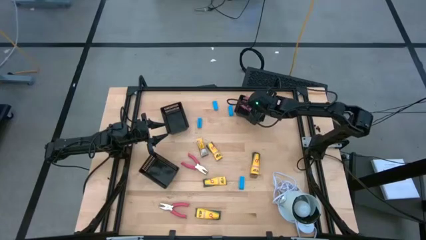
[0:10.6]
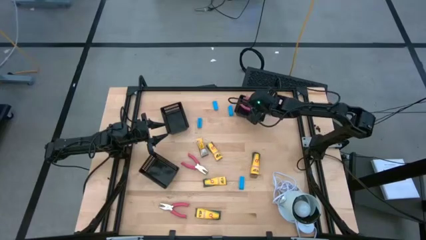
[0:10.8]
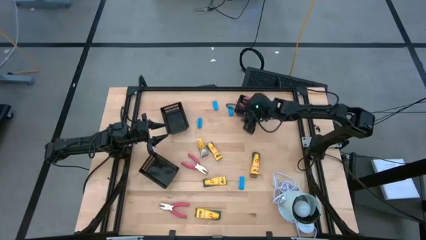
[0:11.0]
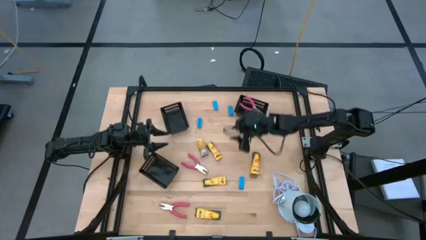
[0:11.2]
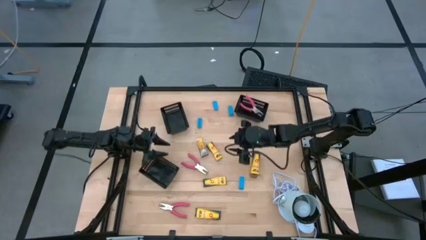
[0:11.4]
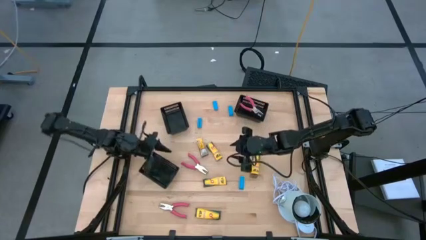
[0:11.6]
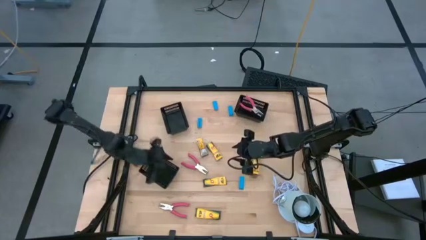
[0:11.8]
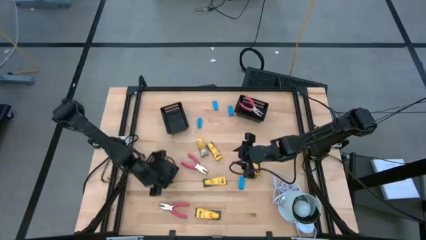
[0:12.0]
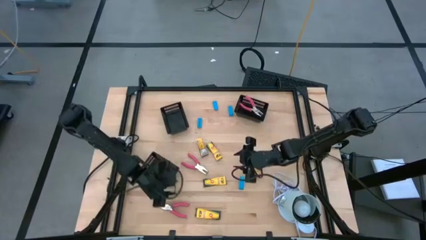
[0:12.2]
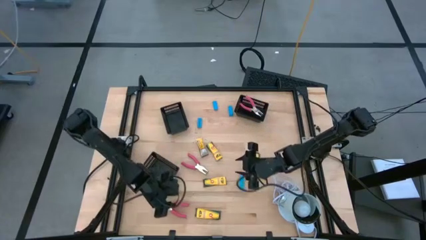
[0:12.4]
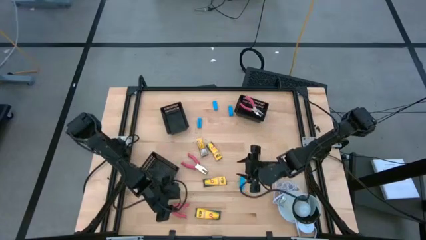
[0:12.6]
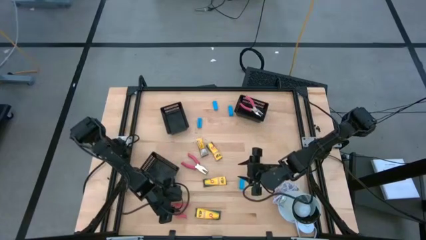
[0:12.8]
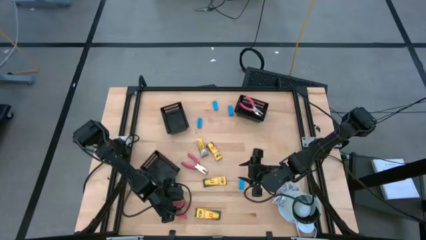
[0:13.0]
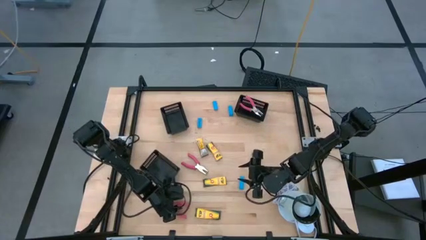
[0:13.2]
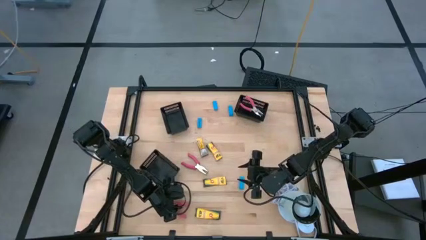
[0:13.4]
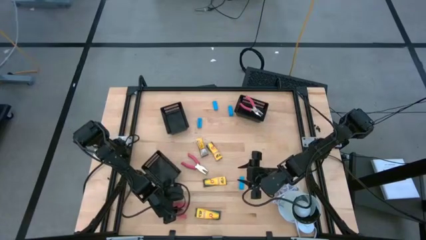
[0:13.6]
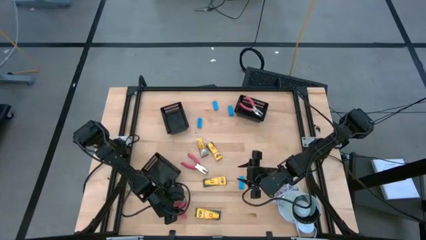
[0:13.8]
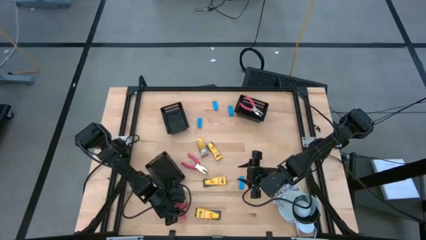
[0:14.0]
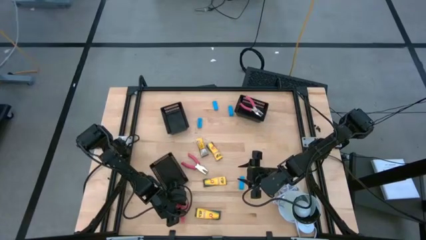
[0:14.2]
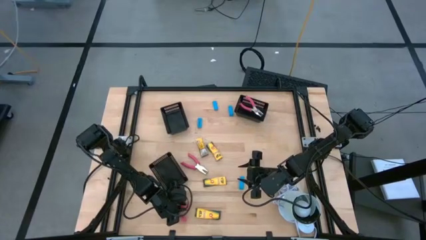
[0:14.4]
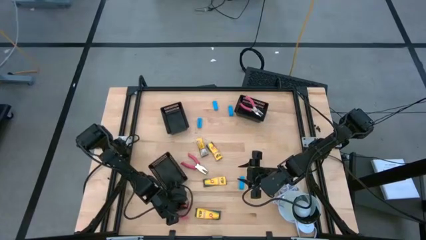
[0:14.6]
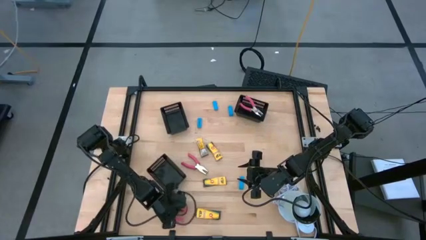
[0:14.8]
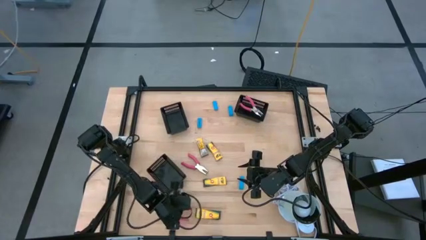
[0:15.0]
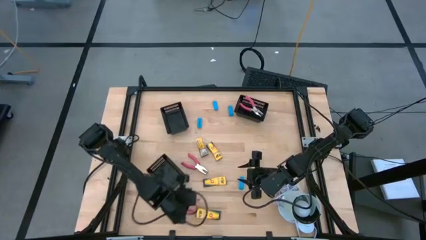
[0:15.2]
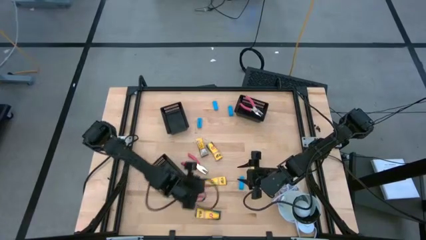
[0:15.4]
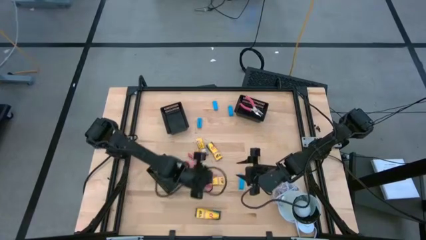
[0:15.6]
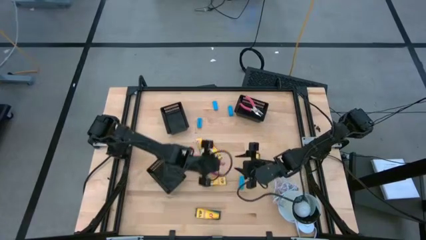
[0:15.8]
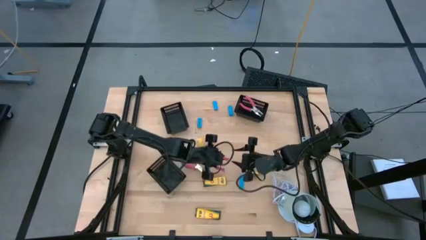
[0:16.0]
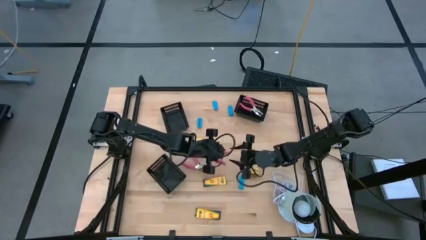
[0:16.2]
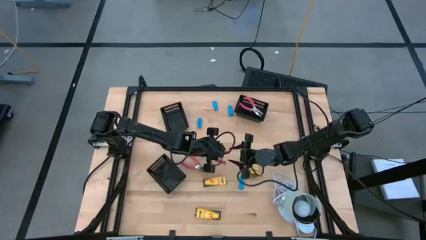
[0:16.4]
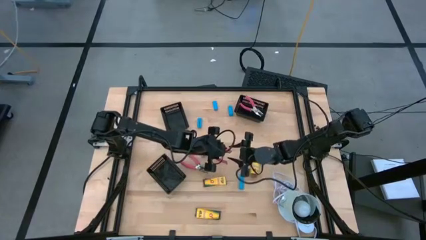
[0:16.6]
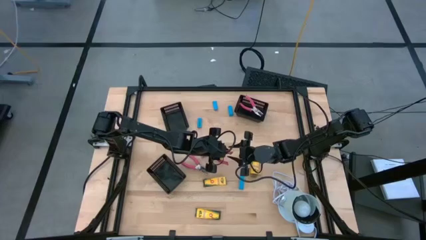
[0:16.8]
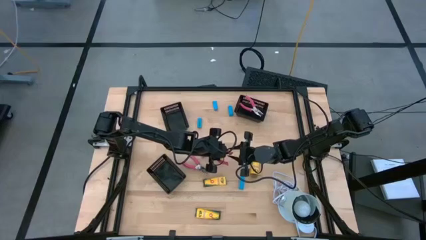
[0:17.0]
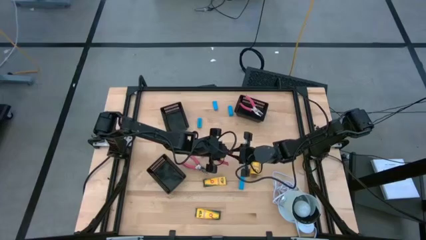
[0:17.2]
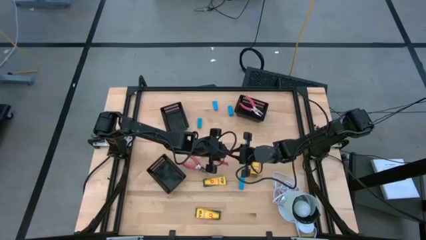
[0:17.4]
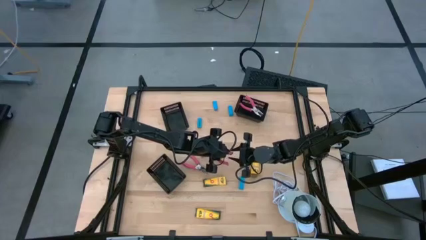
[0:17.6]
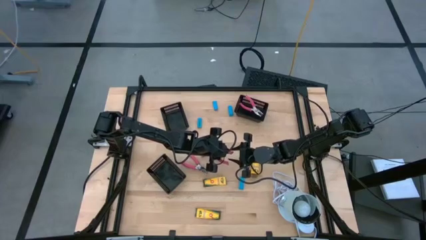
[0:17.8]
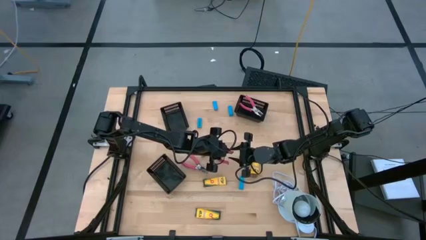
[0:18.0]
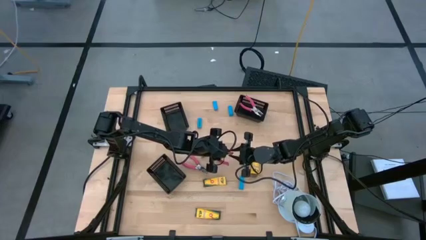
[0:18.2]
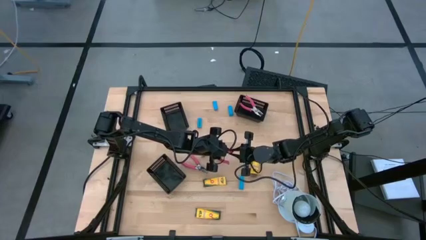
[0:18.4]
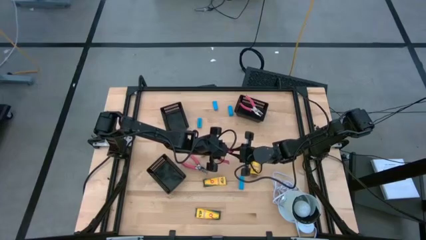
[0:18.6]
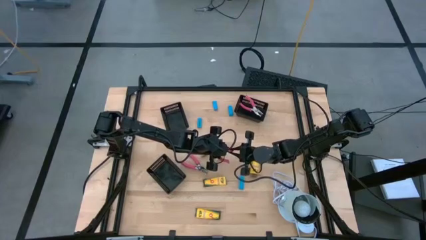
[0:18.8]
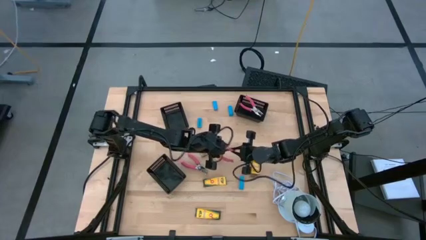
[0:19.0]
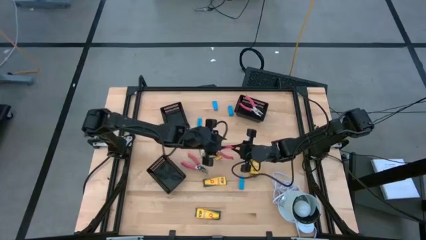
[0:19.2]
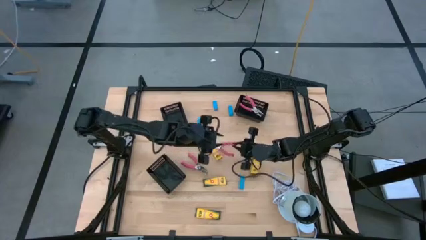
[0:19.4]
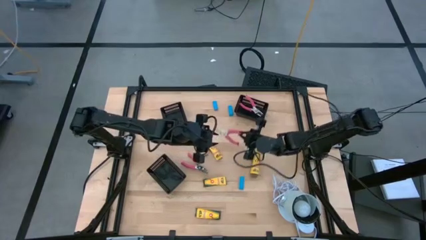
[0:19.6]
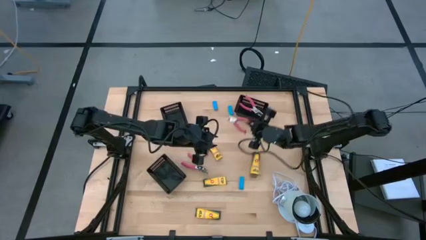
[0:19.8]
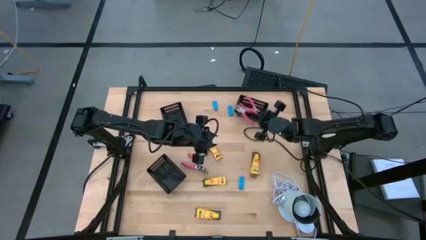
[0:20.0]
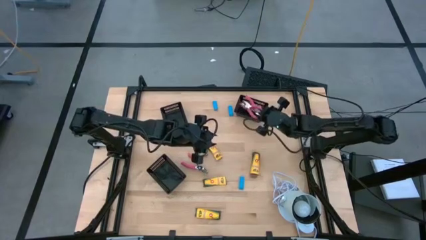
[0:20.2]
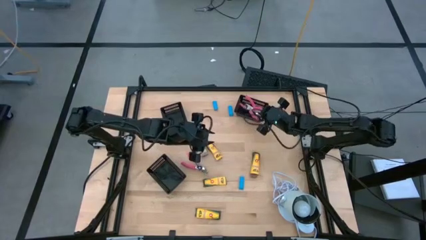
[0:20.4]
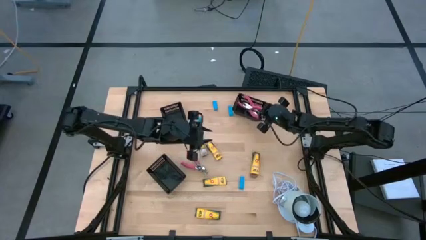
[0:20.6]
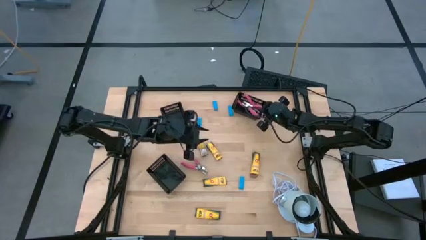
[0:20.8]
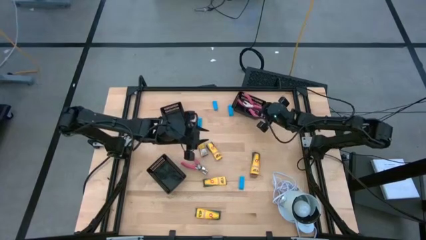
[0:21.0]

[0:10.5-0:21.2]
Task: Pick & Place School Supplies
Put the pink grommet eyelet pliers into the top right black bin

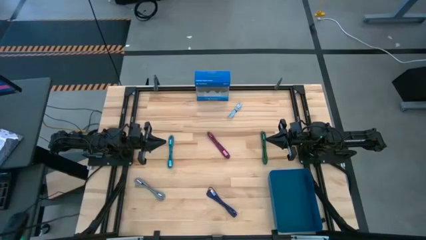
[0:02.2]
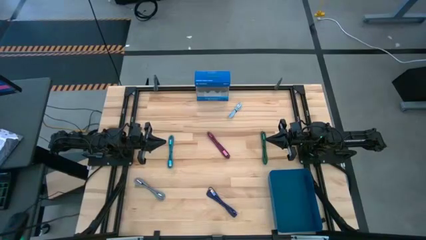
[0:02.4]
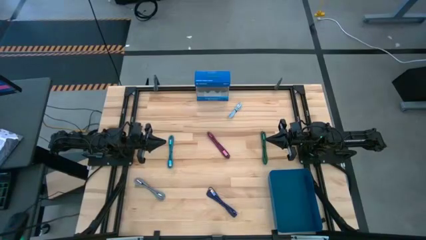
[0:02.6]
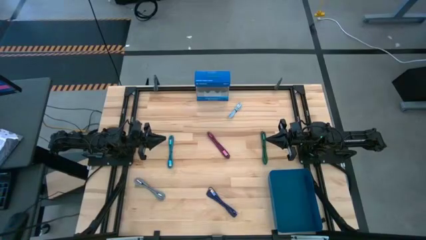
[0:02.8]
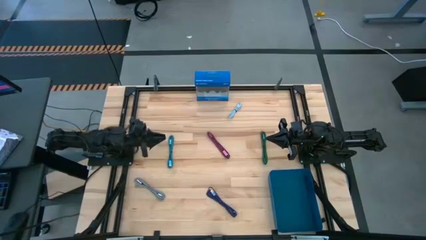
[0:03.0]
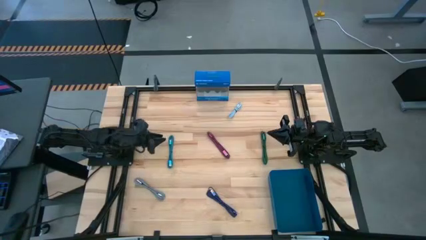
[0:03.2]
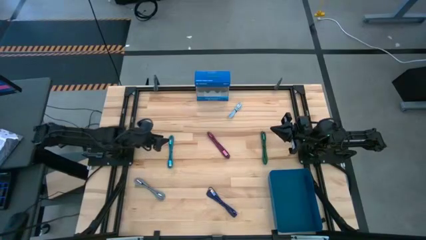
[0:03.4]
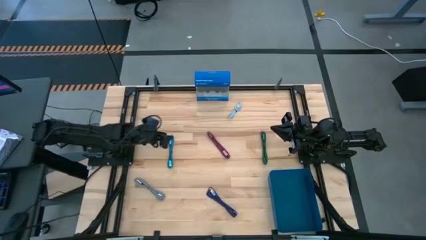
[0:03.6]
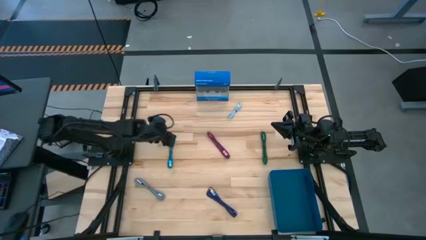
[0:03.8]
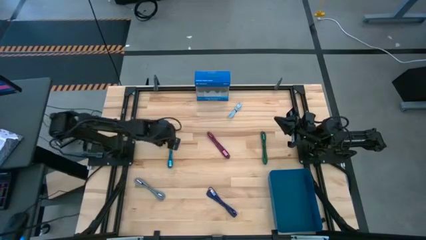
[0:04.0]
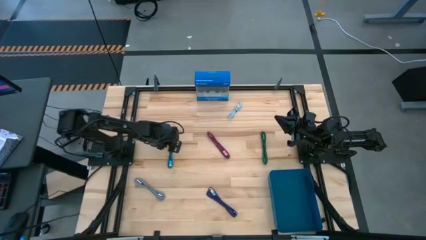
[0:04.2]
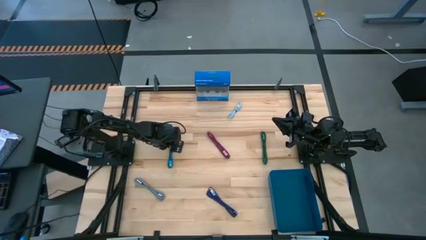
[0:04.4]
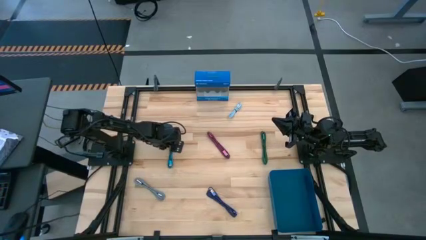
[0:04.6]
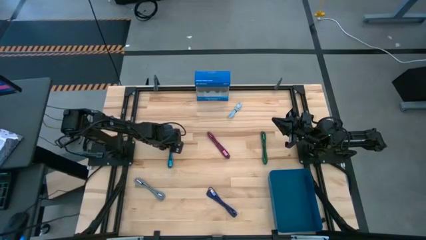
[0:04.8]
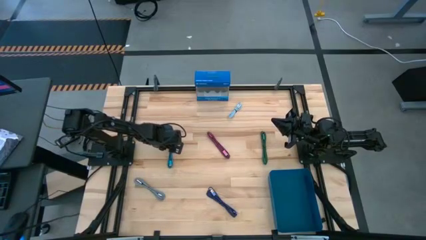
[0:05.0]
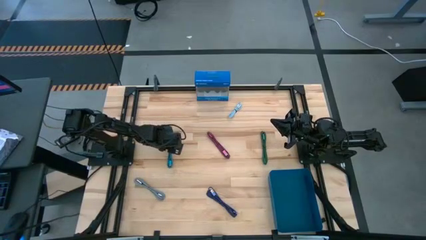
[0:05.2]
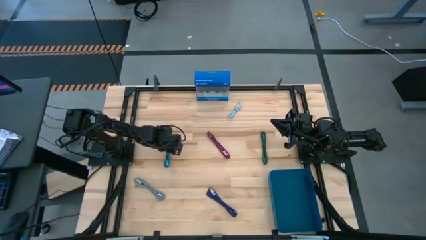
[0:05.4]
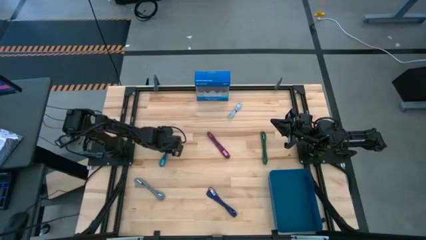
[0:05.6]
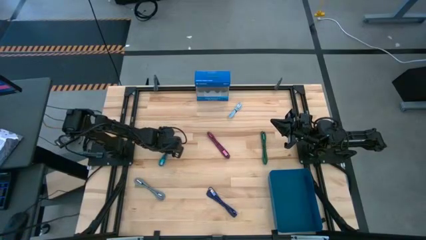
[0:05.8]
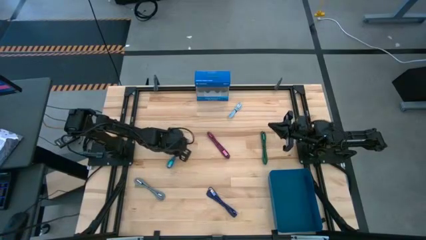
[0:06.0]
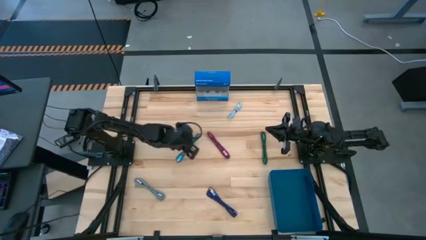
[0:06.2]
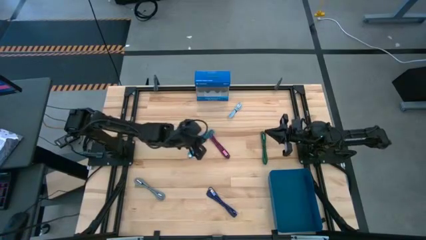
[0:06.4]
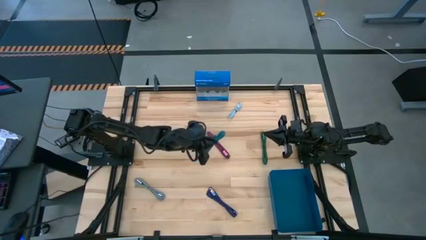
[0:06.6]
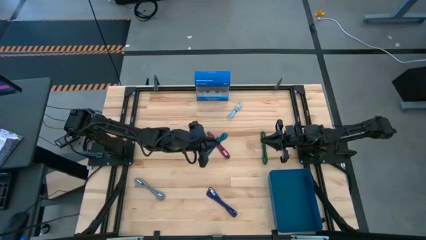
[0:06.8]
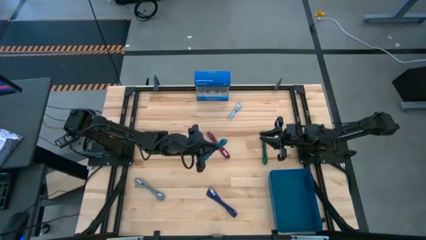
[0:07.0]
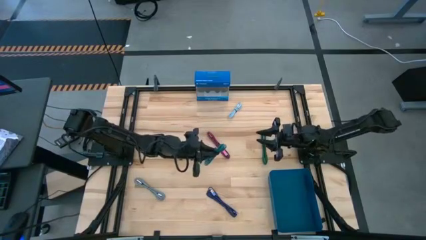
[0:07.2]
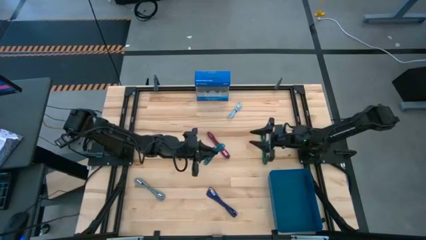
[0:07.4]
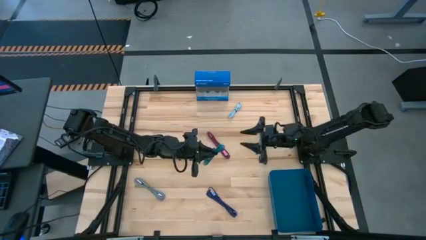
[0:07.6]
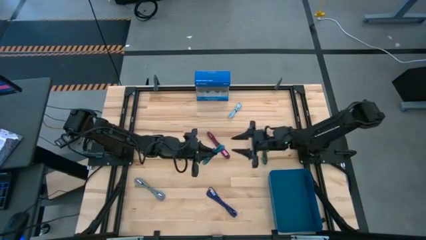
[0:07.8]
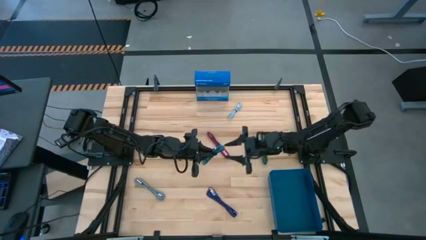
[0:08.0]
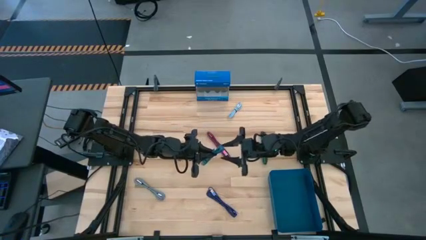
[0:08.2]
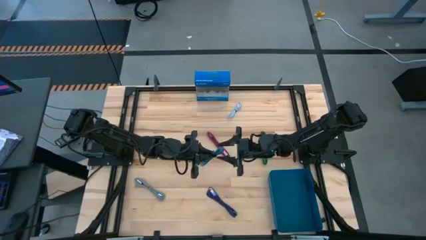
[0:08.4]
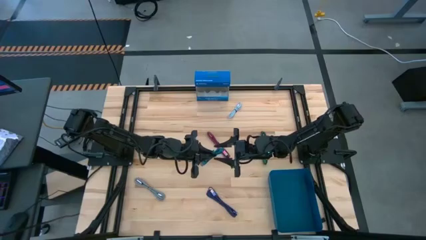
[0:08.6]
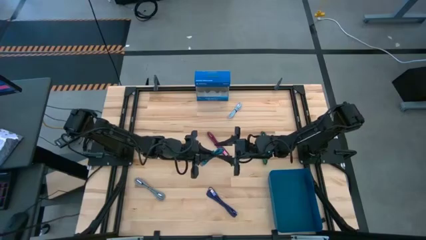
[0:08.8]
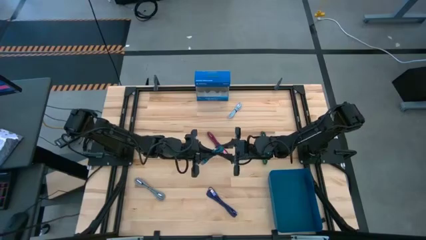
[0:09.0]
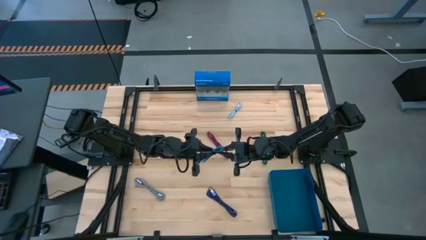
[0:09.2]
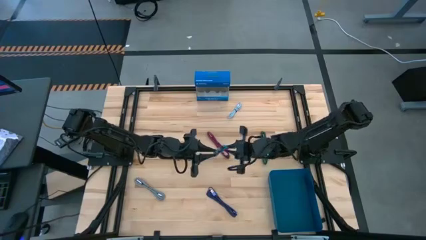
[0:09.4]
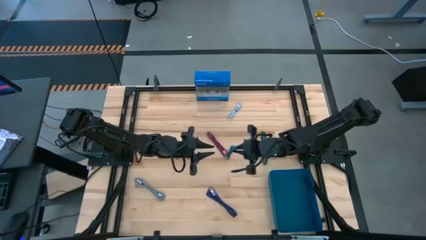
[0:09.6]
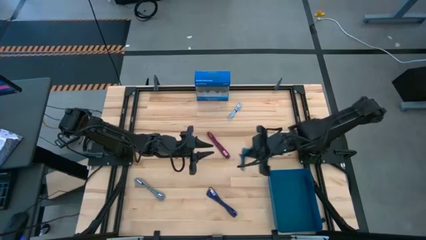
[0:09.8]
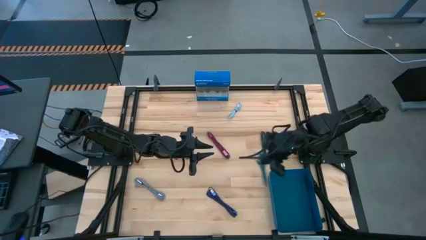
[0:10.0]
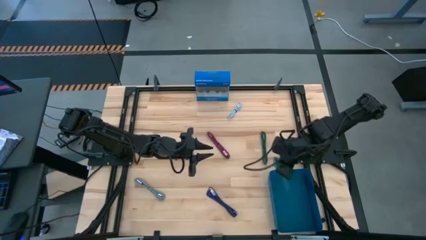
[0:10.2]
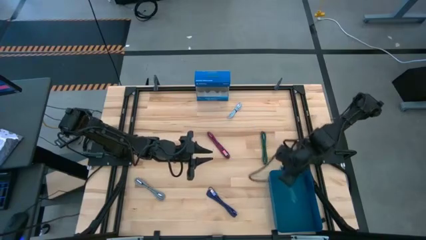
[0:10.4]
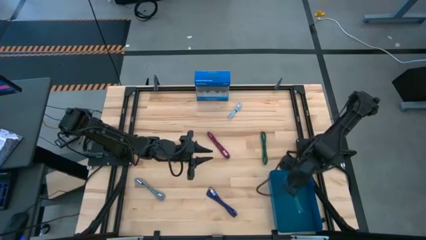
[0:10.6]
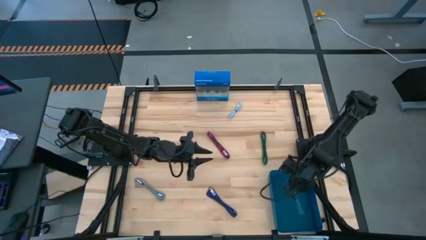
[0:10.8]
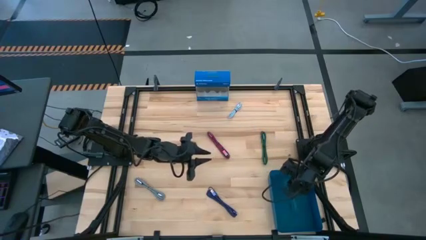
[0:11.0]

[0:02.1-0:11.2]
Task: Pick and place USB-C Cables
Put the blue USB cable into the blue bin
